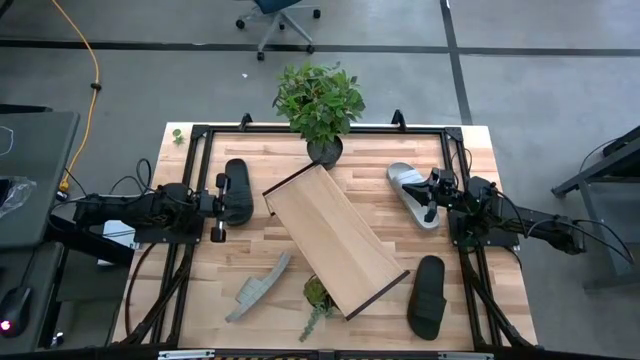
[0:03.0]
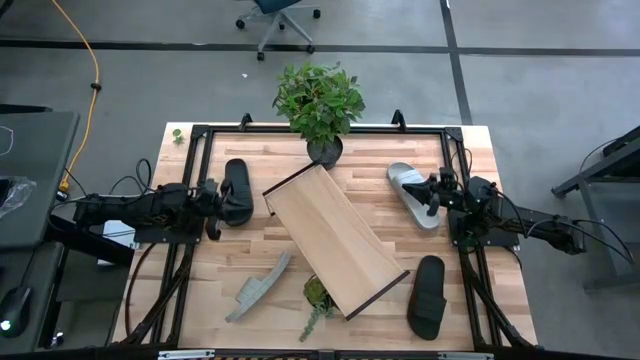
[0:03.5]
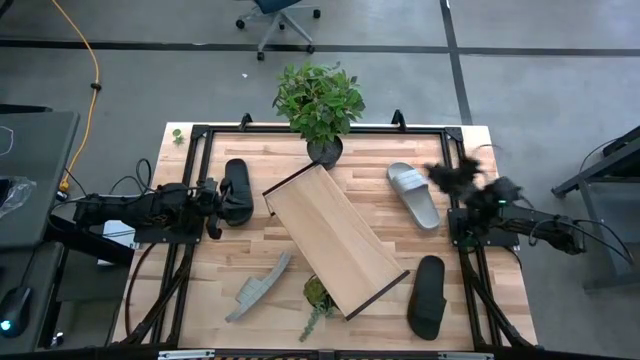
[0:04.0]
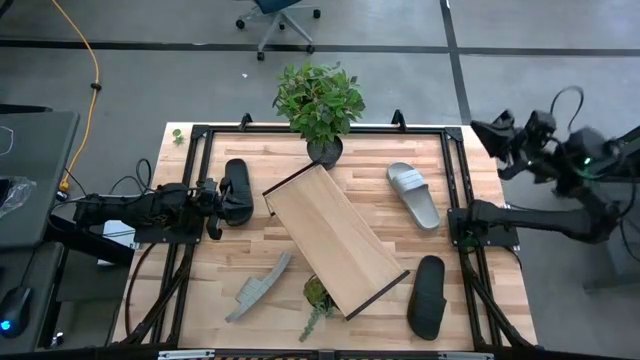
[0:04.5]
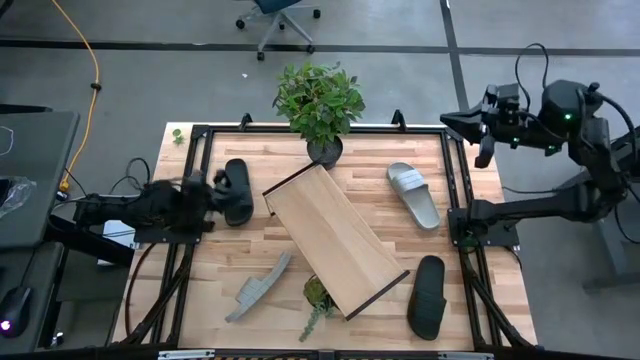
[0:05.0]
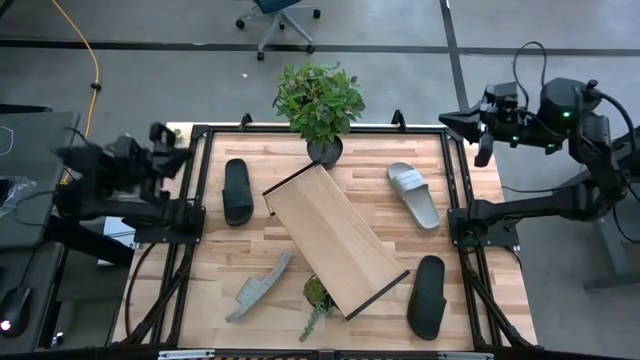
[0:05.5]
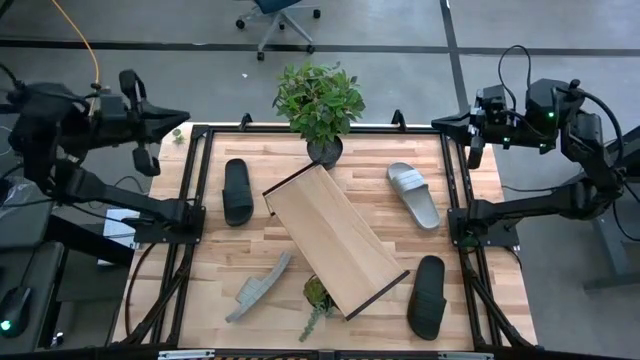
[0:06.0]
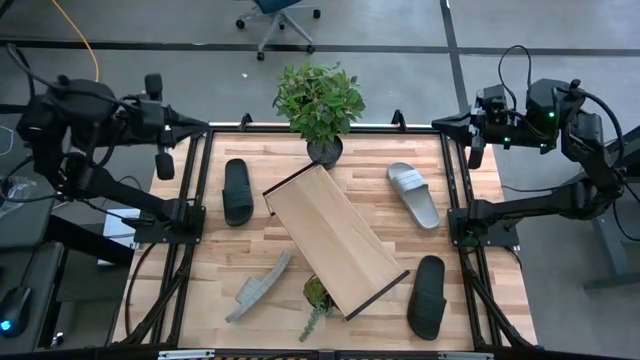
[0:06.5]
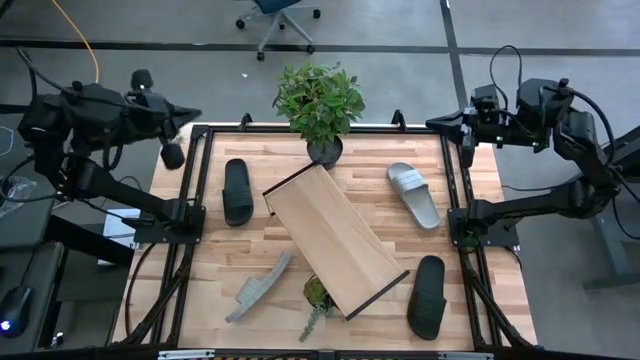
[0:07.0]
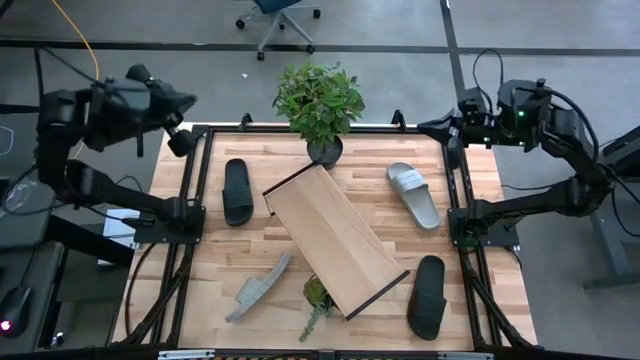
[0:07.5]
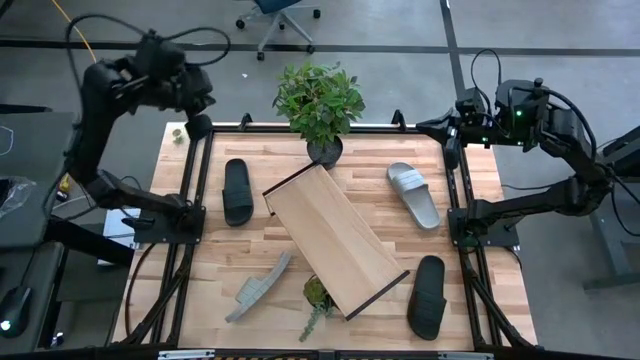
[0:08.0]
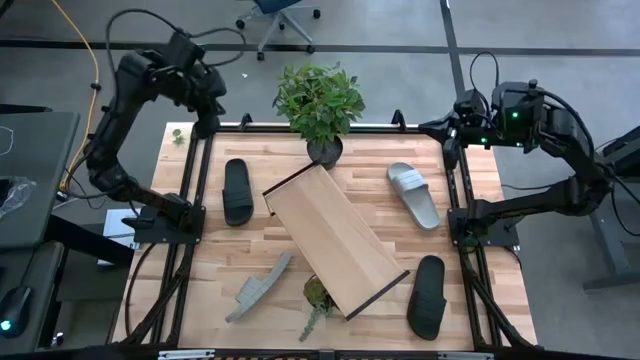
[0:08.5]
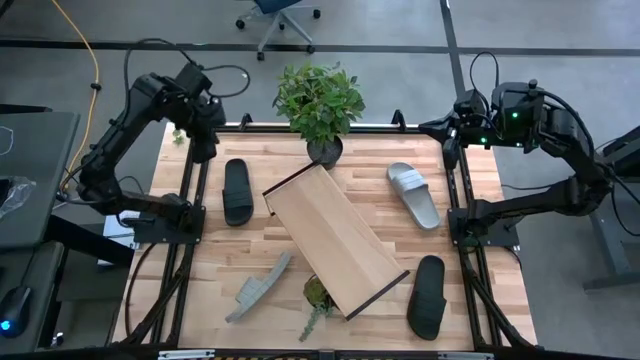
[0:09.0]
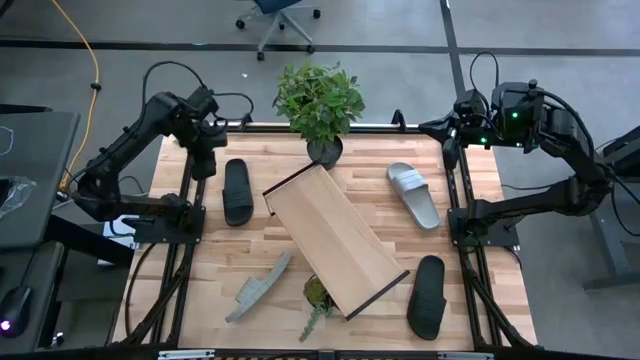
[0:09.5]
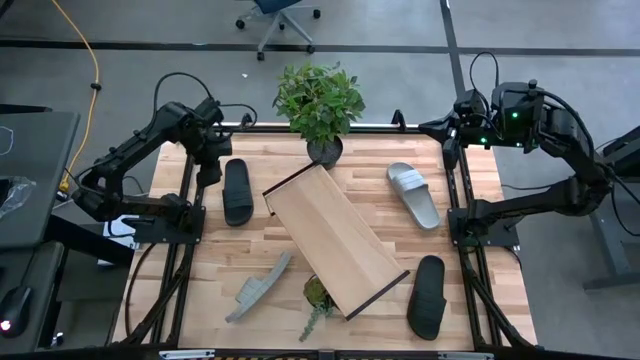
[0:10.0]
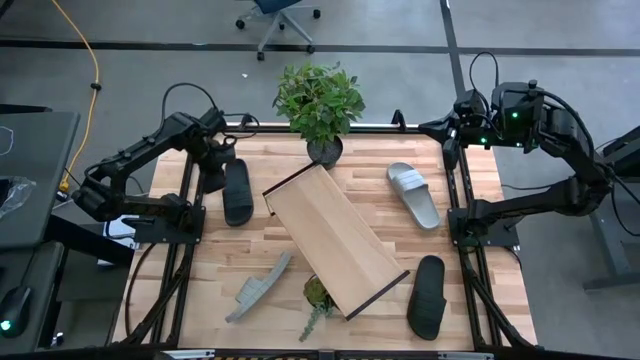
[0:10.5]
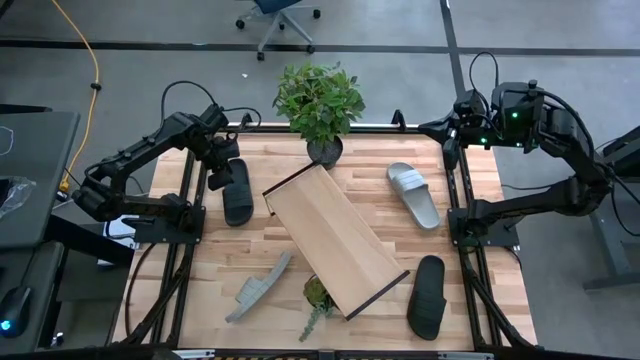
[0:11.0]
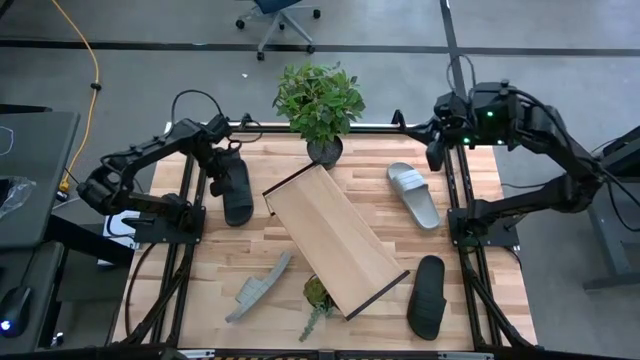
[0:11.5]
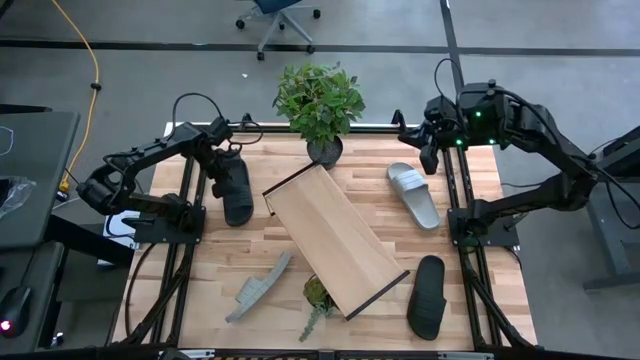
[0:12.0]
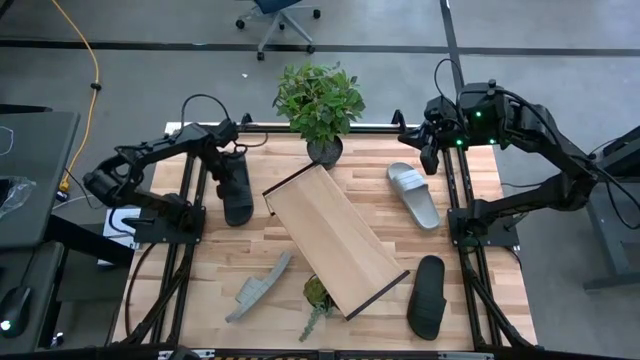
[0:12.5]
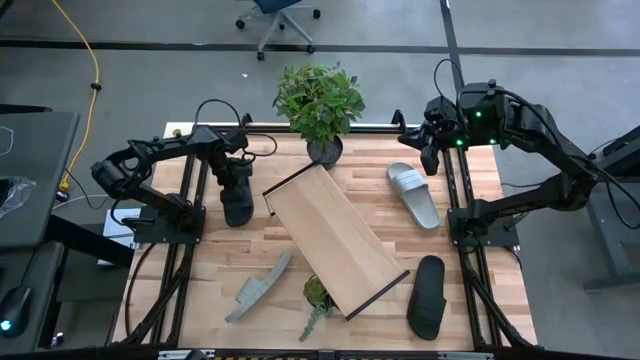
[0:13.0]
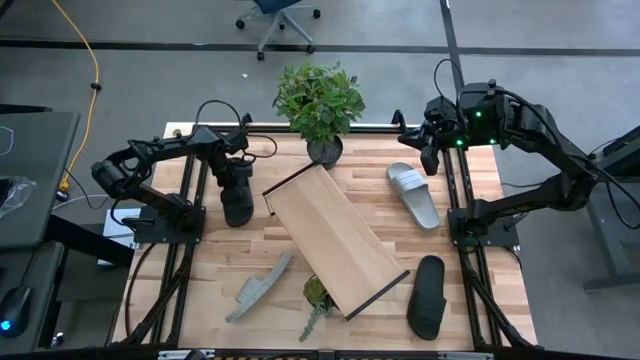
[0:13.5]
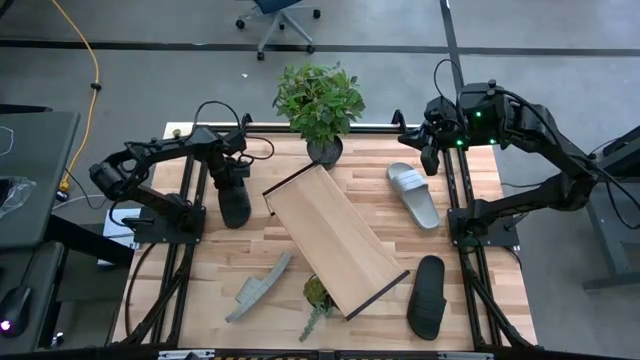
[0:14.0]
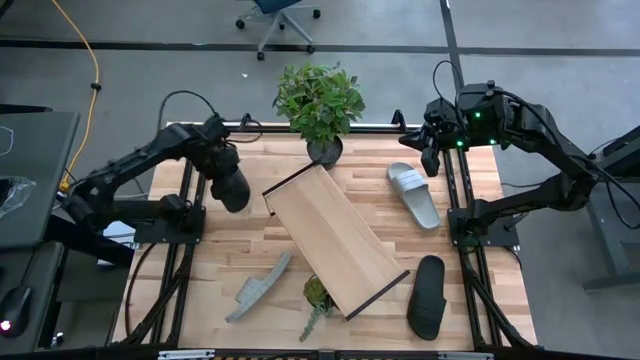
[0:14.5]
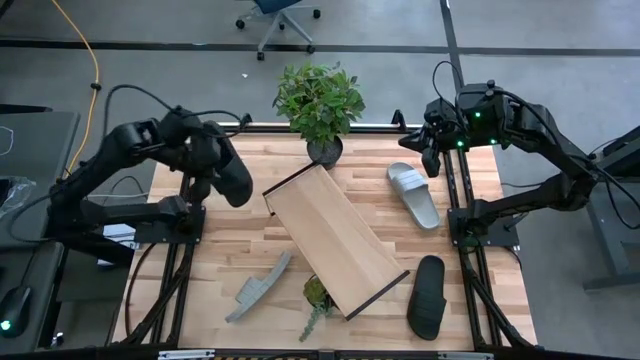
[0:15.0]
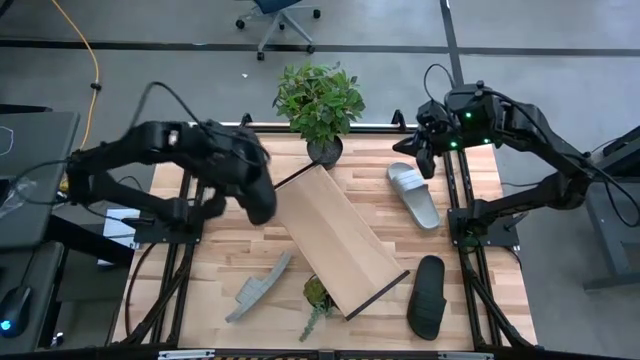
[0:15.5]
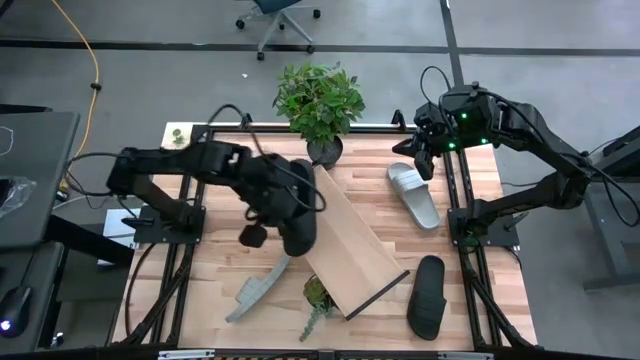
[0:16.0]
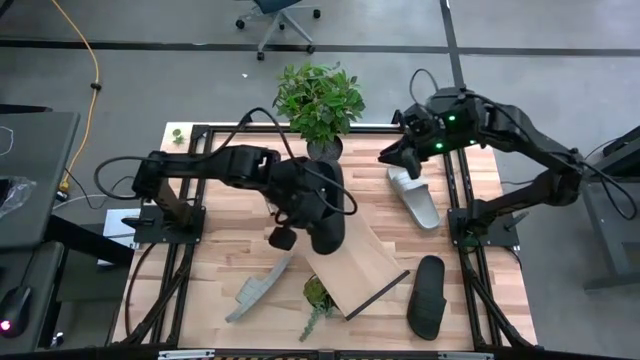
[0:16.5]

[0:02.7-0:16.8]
Task: Pick and place slides into the shelf
Put the left black slide on the shelf

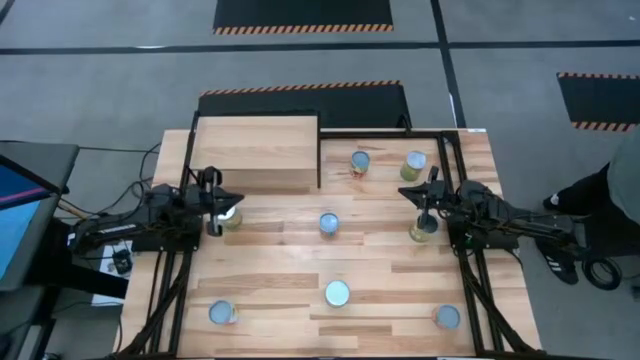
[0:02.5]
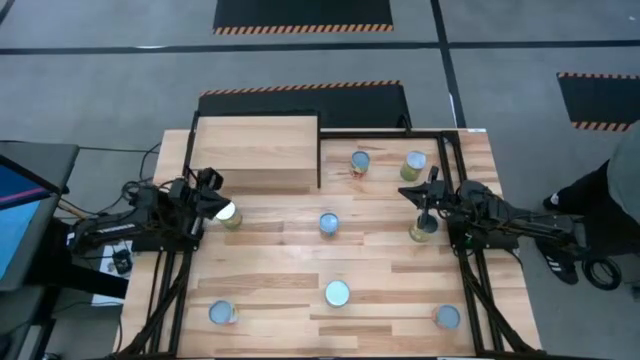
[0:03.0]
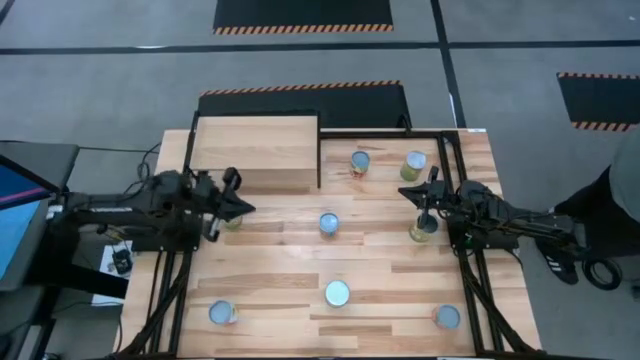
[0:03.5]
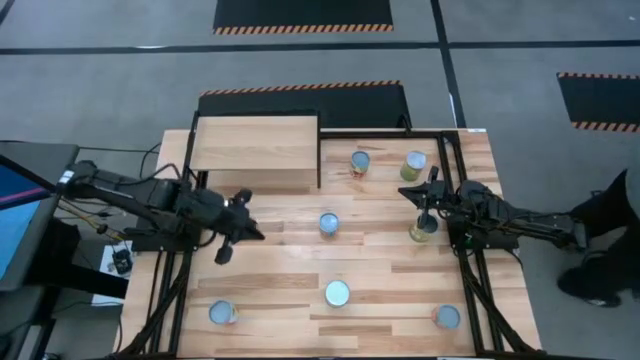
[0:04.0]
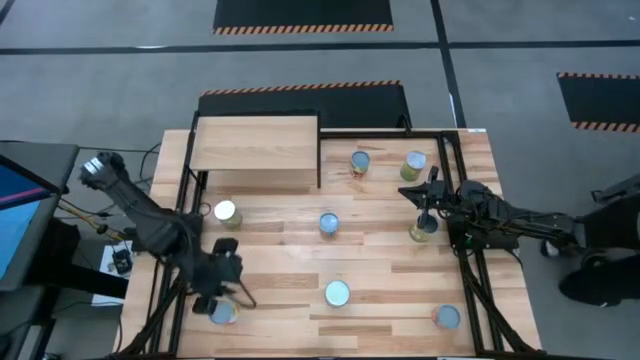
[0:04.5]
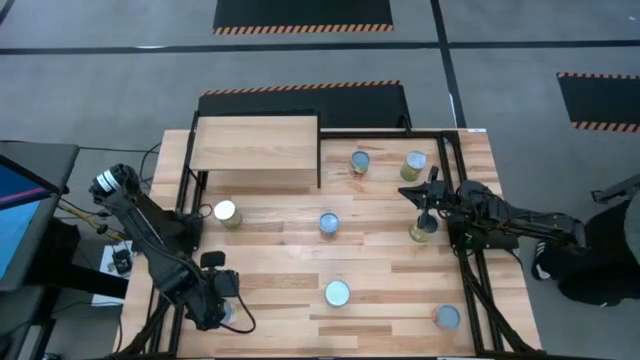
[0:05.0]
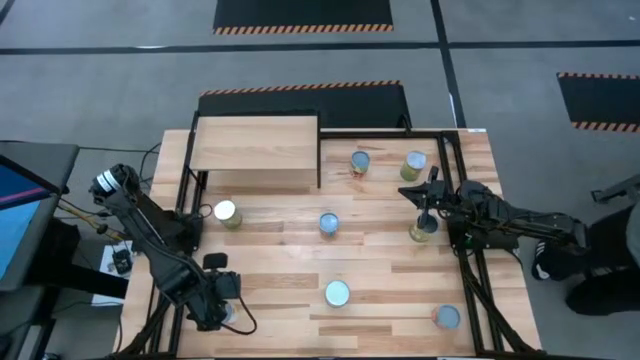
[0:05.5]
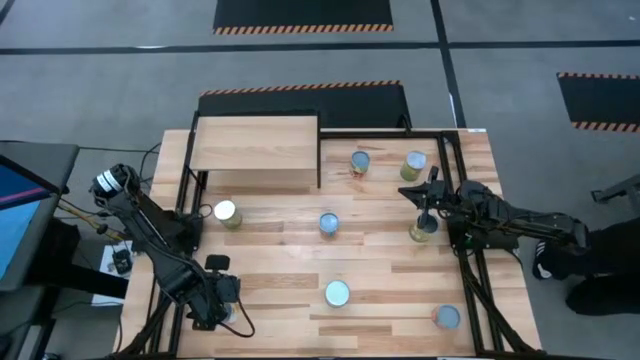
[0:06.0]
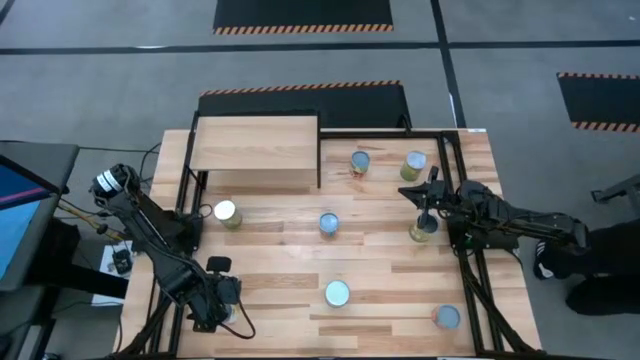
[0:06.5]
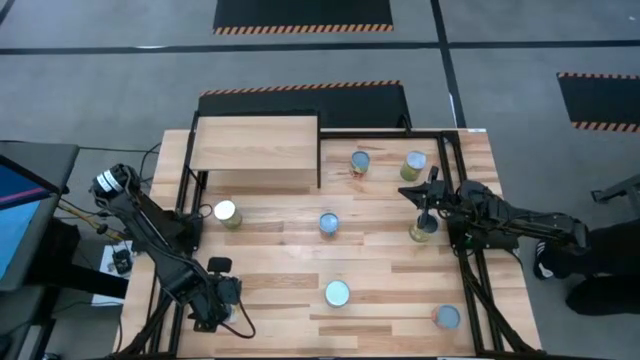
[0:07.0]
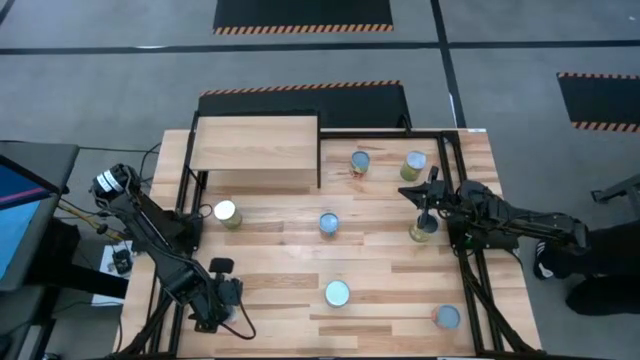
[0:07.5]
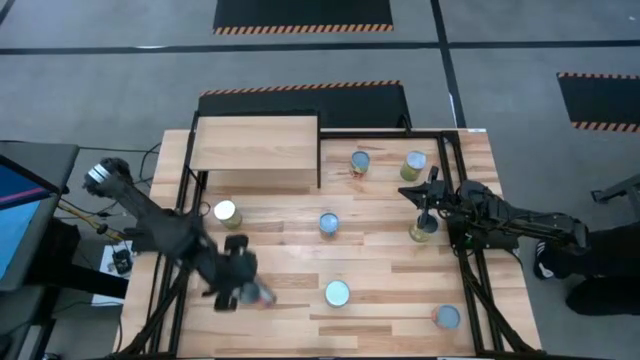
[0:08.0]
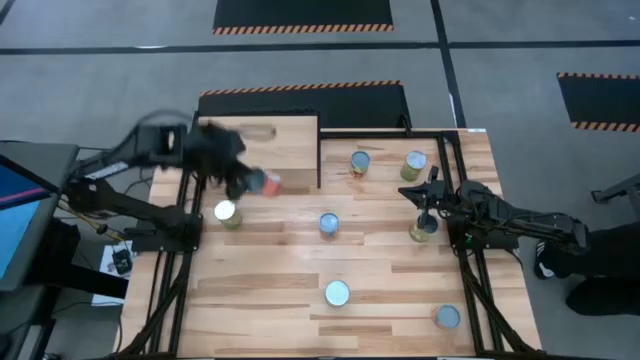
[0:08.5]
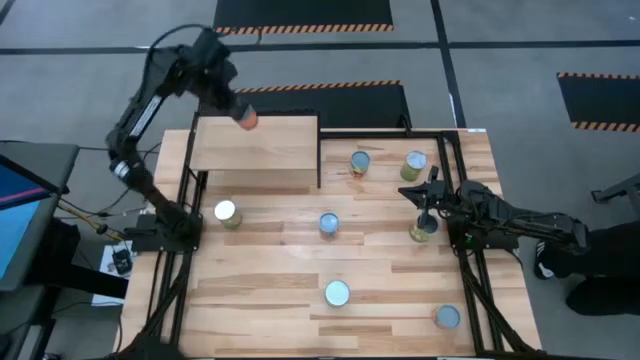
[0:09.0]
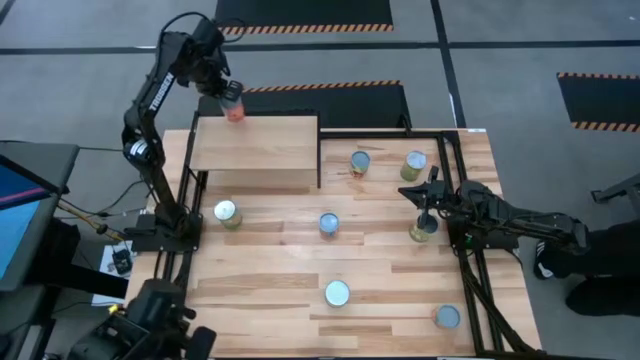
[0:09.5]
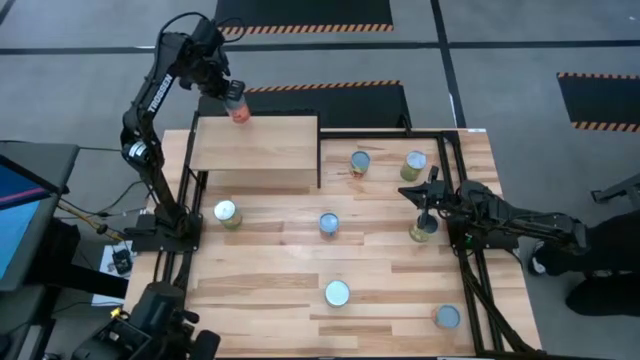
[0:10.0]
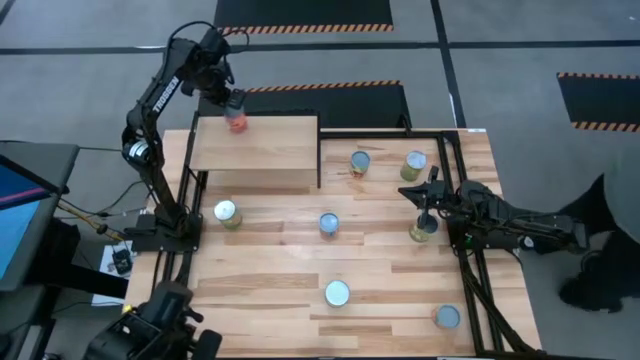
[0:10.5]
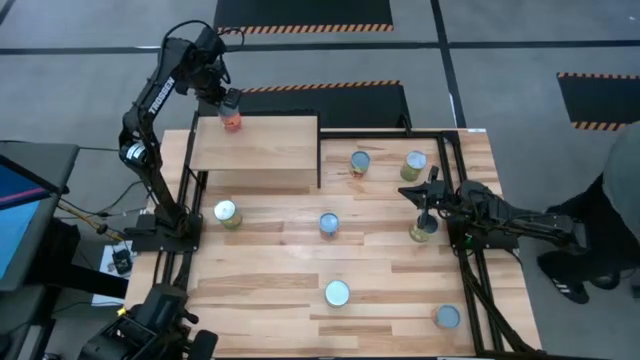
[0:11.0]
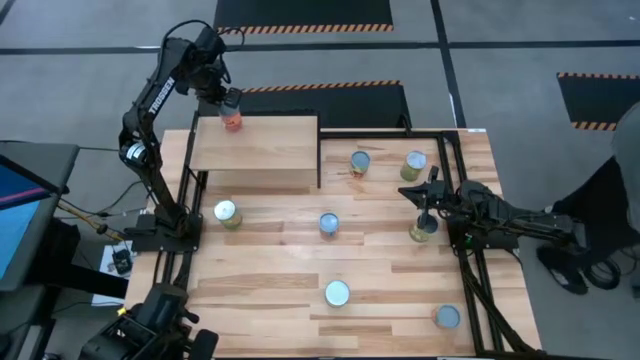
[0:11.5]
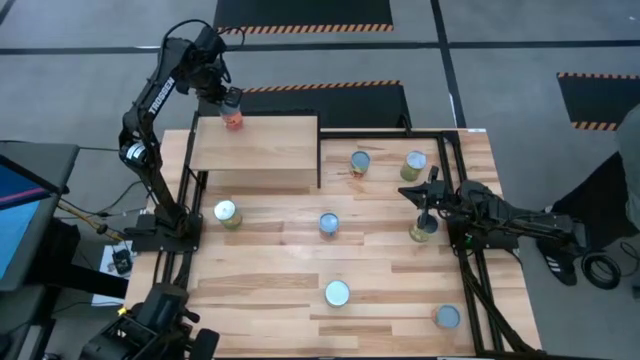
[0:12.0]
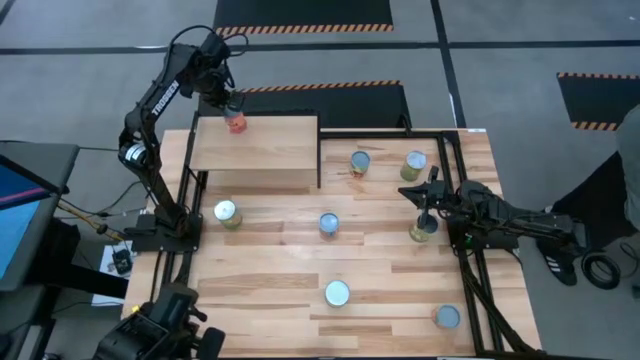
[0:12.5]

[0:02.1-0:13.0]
Task: Pick and place cans onto a shelf
Put the canned mixed fruits on the shelf
